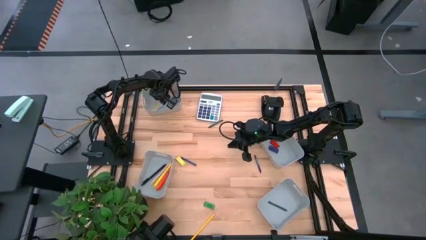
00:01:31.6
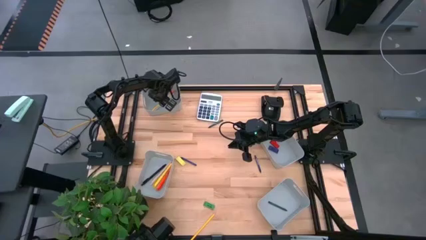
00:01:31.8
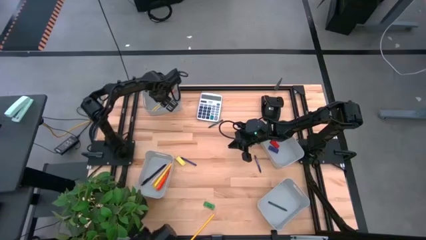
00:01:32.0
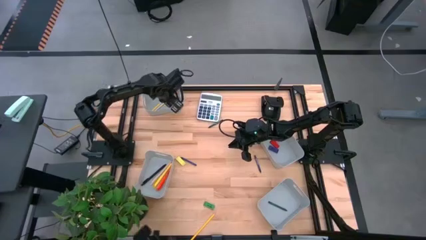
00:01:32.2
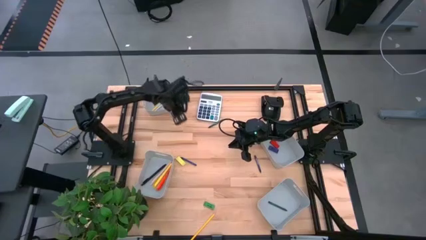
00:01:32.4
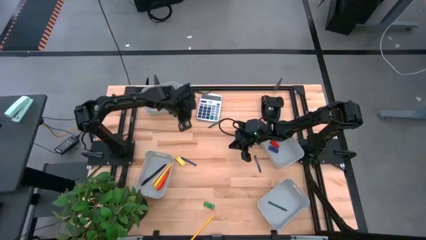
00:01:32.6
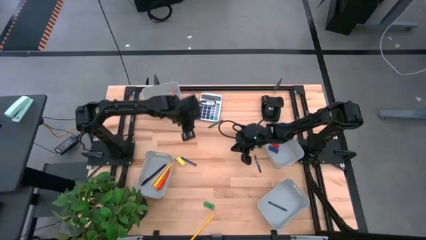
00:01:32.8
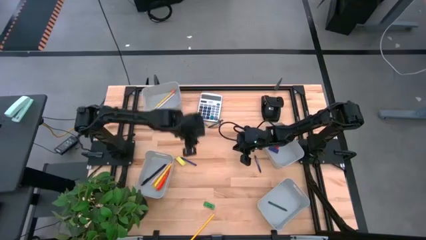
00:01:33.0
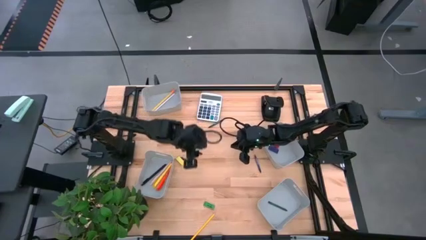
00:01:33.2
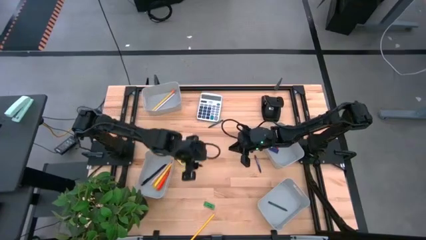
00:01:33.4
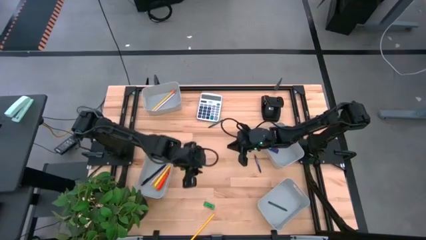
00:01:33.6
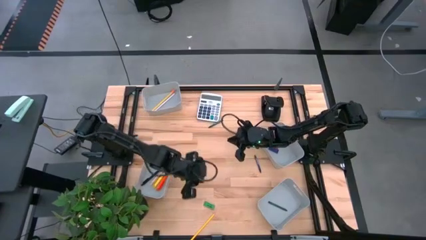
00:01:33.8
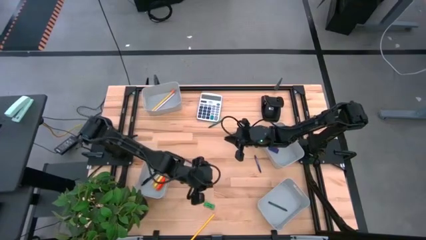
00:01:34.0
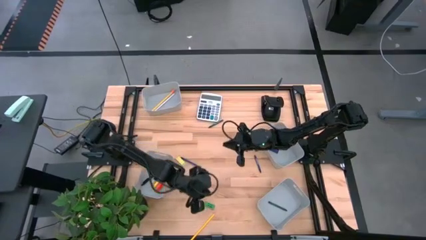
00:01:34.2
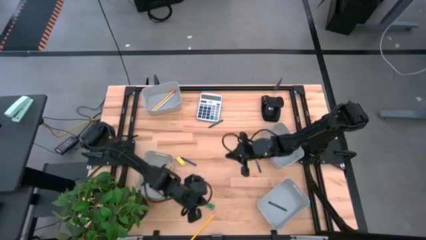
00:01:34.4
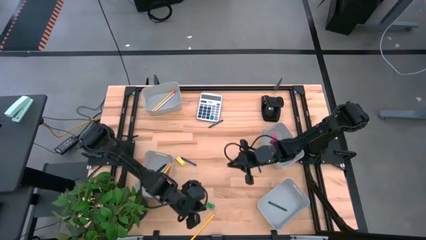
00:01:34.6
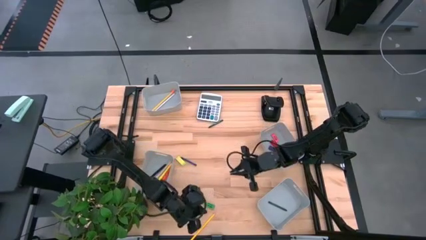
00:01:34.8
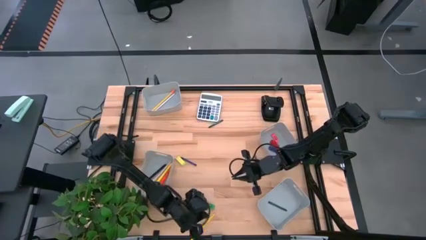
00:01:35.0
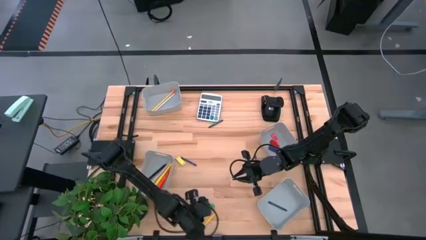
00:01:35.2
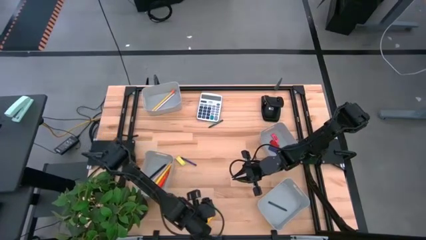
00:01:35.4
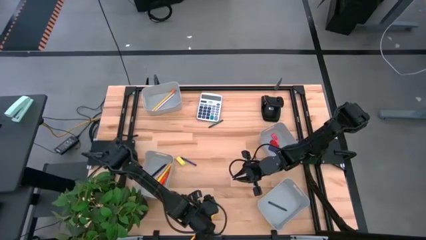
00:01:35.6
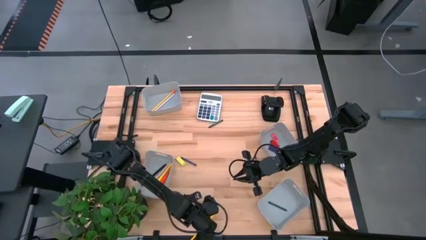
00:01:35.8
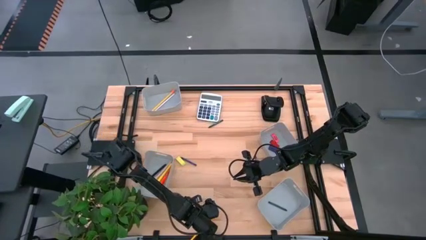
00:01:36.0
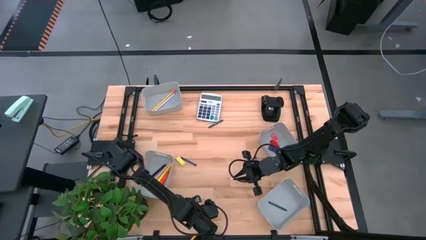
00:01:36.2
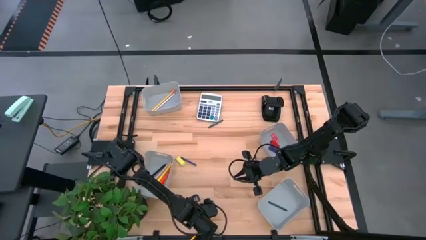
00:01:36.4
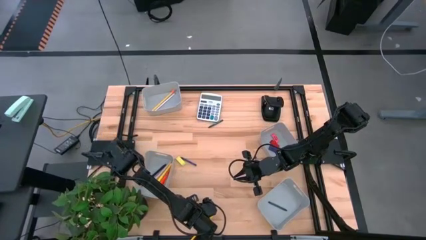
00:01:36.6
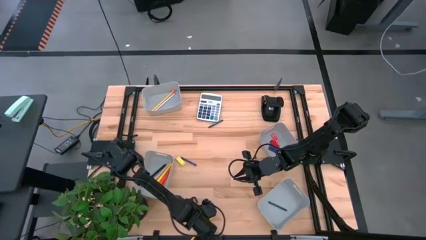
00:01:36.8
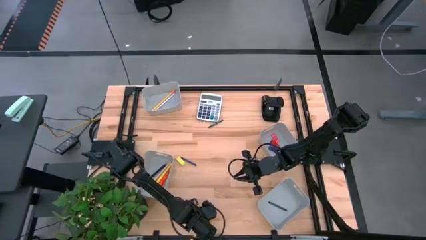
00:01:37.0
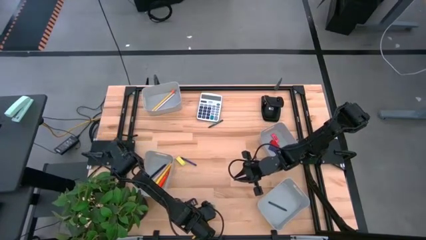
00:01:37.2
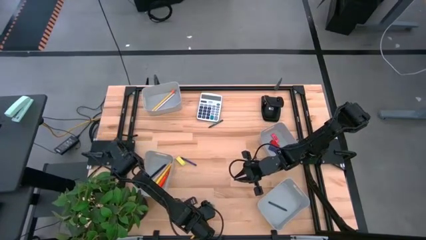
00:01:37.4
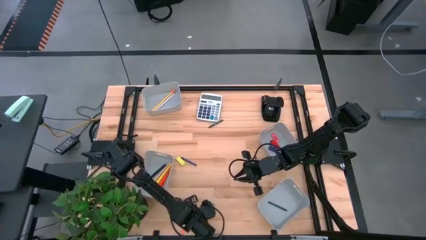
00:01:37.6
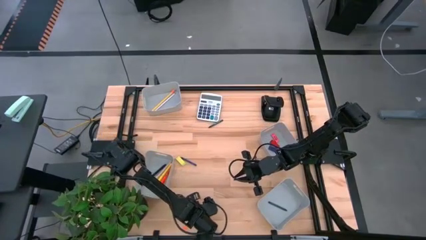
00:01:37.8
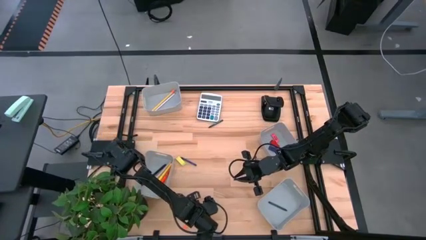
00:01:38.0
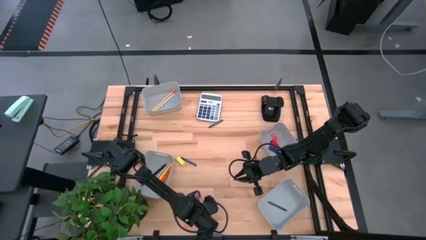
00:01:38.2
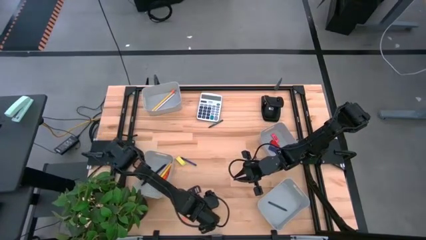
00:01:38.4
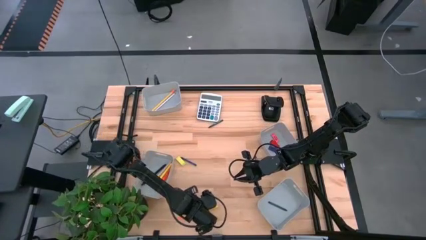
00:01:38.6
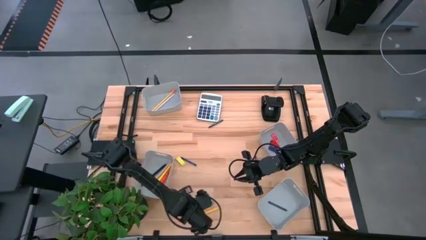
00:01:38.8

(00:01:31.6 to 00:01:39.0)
Task: Sort crayons/erasers/pens/pencils in bins
Put the yellow pencil into top left the gray bin

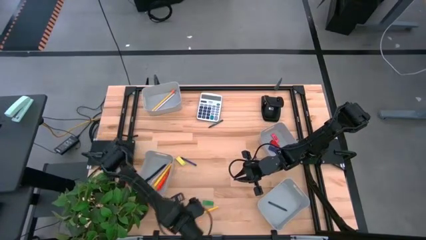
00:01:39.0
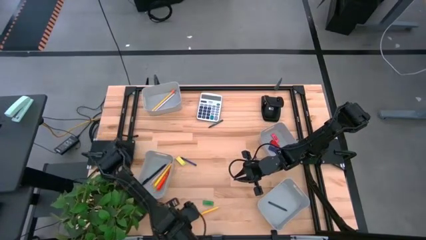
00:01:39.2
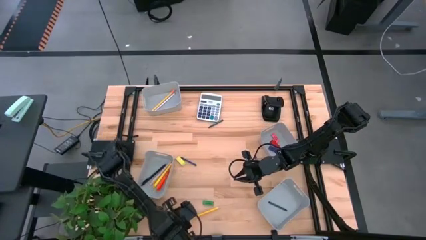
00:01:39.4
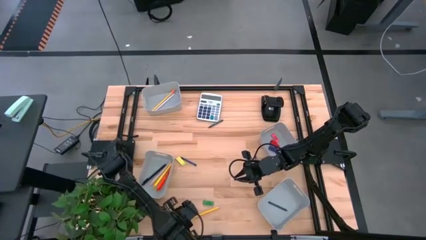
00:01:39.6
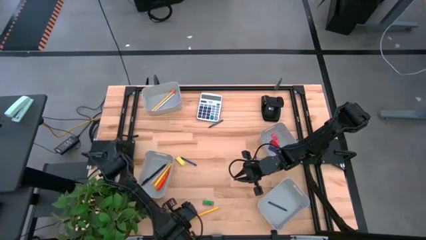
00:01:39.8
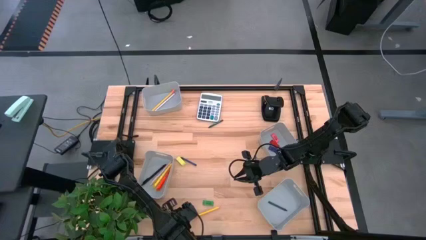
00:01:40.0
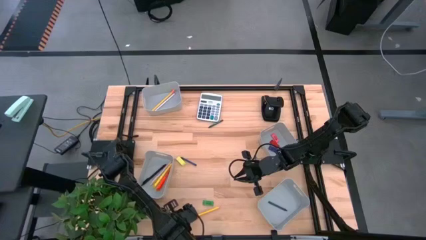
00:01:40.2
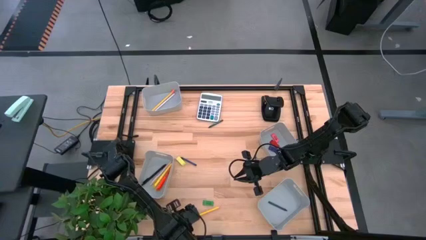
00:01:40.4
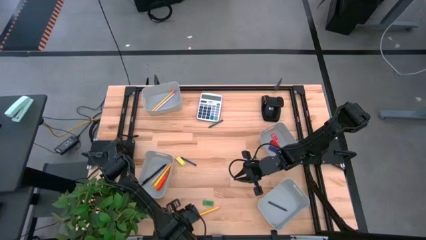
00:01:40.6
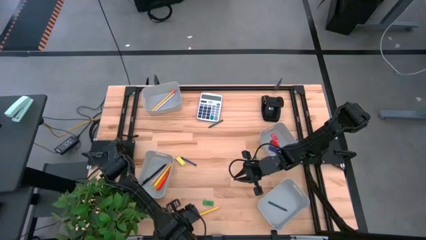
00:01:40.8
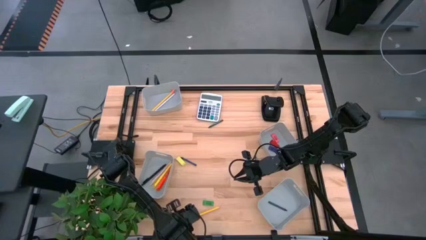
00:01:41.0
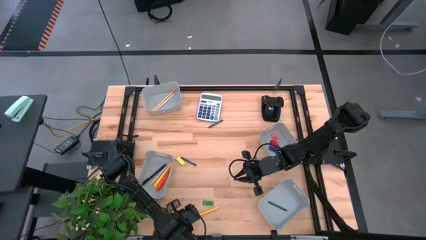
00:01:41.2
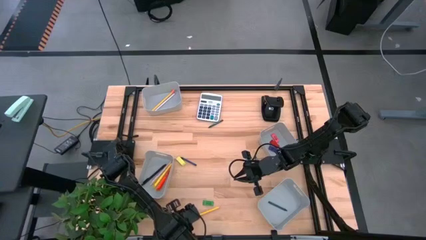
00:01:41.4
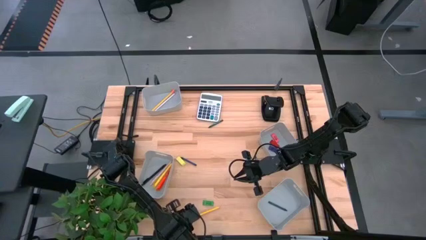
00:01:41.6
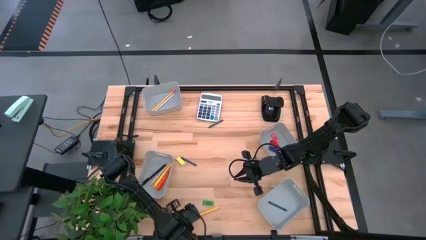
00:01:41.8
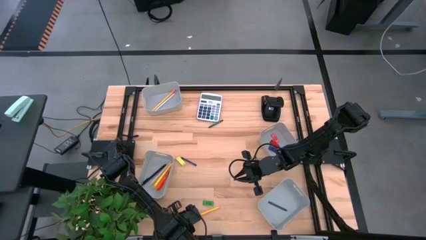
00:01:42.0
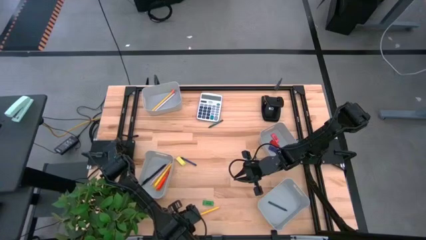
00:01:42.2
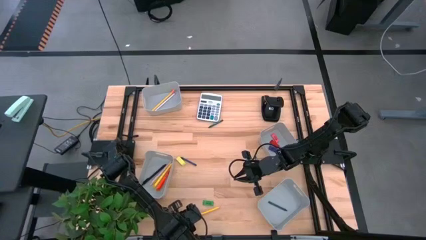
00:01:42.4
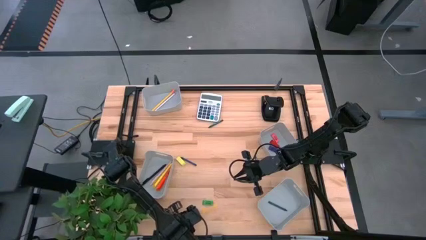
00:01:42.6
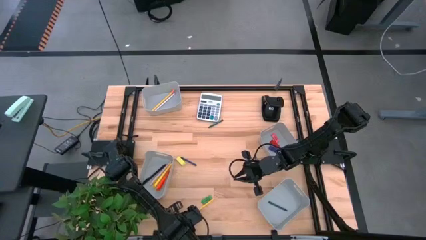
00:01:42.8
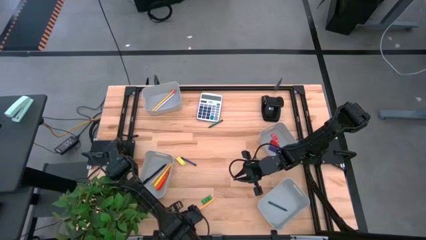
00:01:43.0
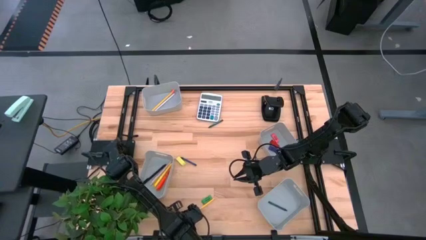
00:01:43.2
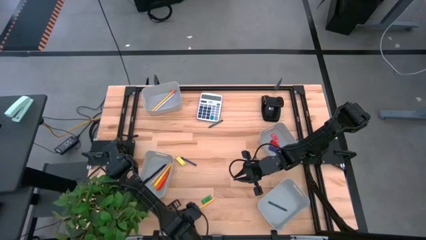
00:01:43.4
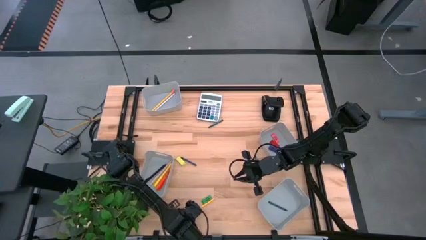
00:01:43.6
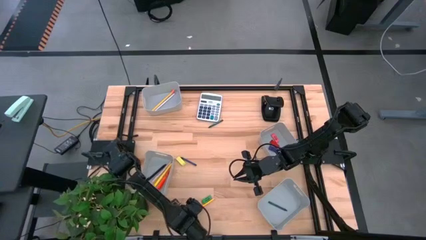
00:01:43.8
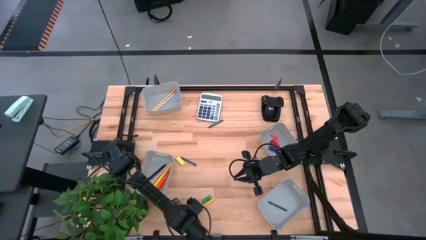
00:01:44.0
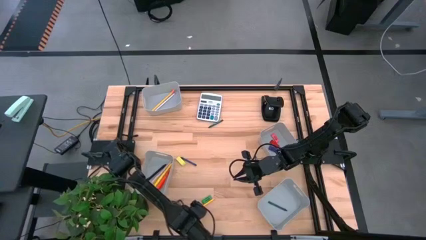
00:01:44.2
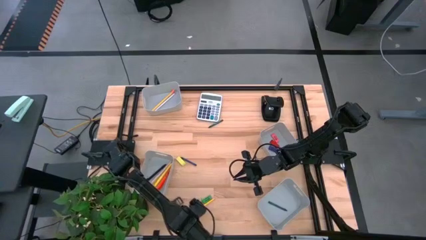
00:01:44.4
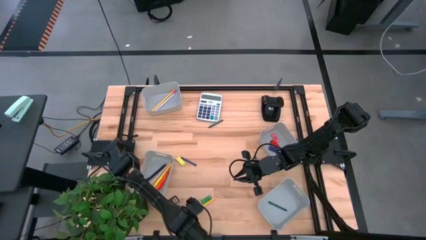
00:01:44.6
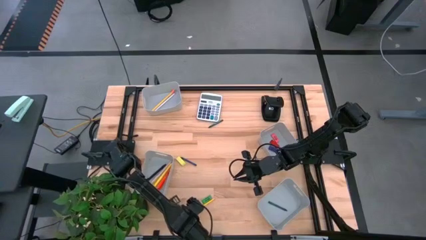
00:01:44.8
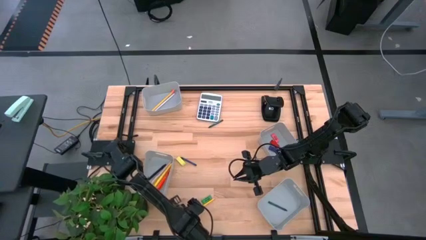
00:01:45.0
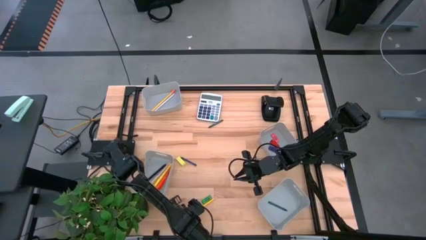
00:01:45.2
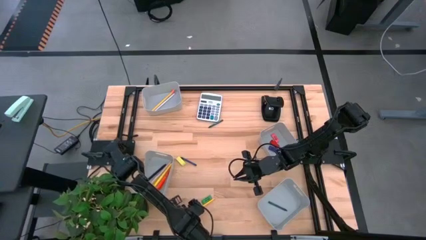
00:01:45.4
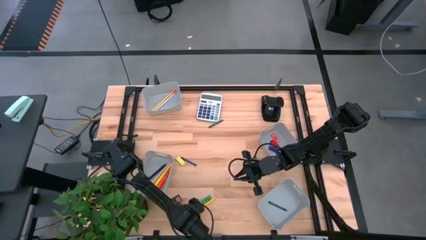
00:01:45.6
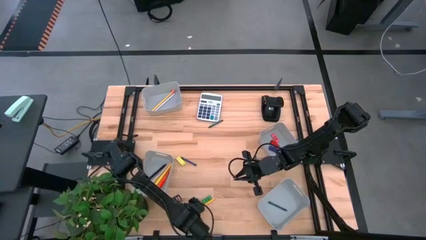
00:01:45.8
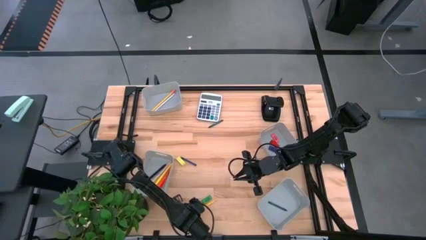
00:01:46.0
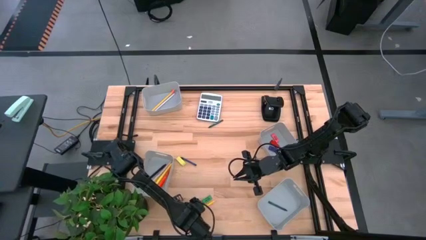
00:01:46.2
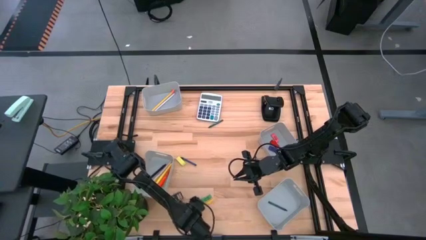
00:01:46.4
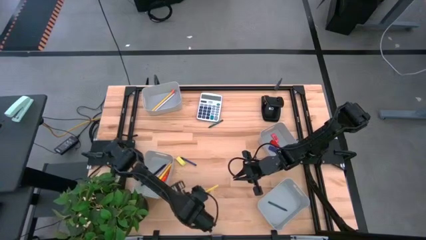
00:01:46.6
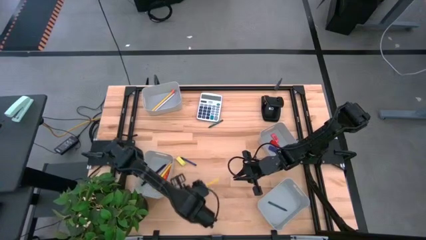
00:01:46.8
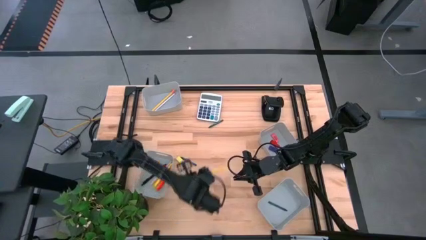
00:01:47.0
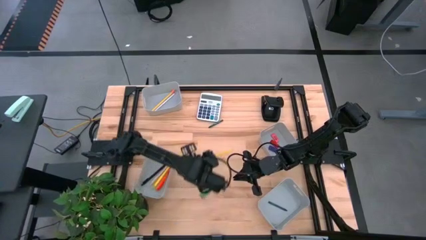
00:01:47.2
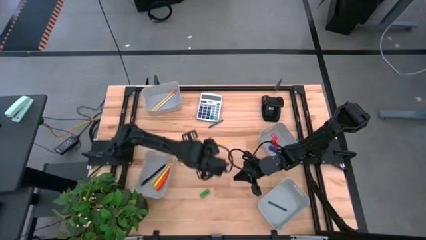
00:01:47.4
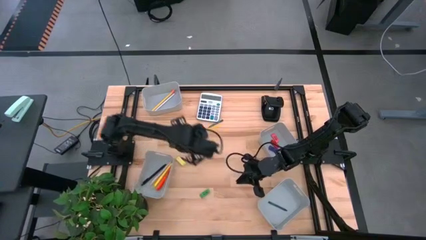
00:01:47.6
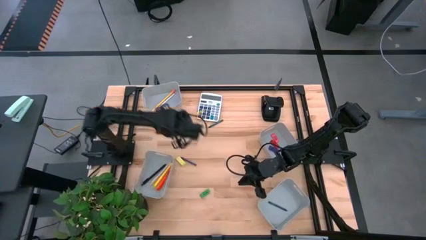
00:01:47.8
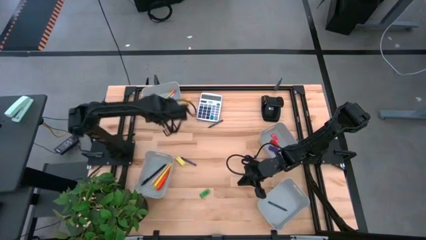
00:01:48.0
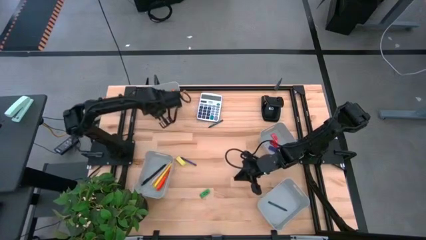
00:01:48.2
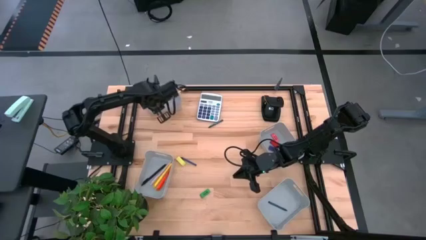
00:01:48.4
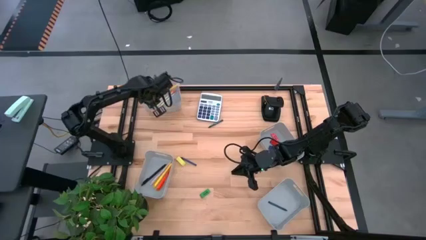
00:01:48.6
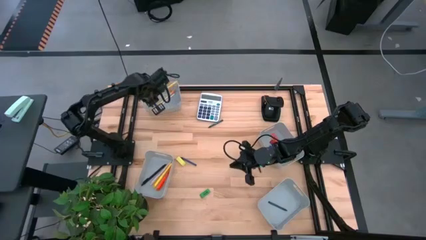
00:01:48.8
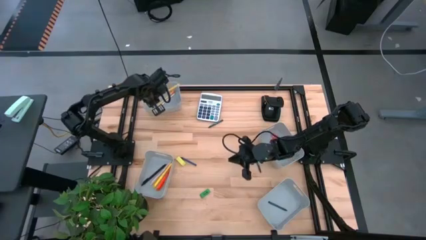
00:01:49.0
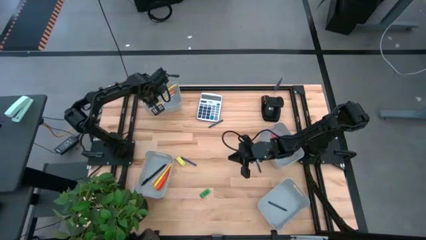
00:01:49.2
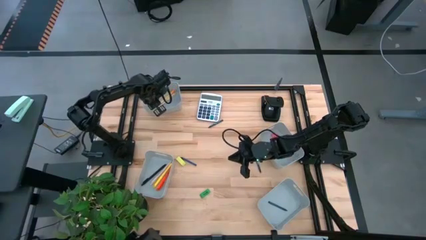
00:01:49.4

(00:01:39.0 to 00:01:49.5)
Put the yellow pencil into top left the gray bin
